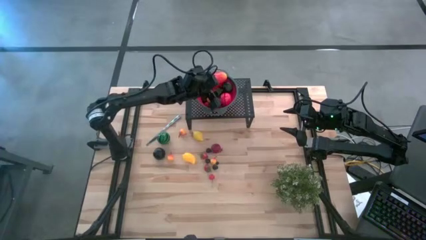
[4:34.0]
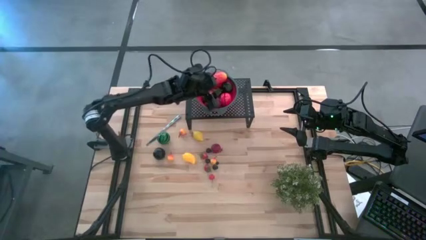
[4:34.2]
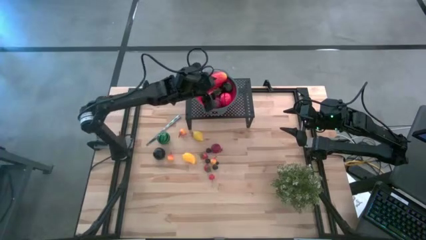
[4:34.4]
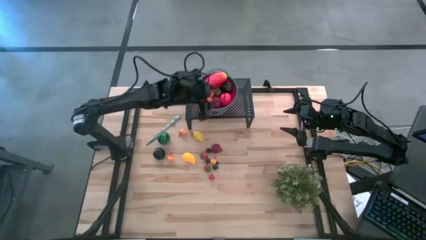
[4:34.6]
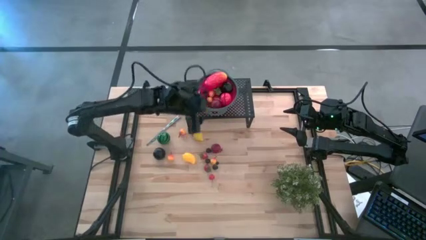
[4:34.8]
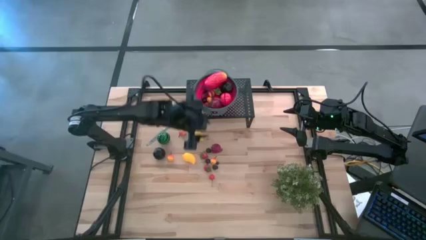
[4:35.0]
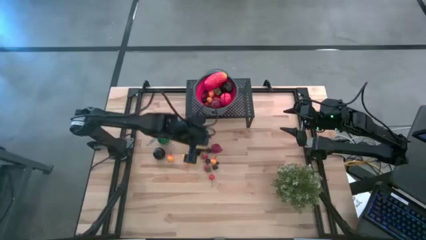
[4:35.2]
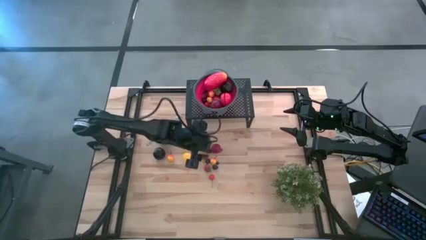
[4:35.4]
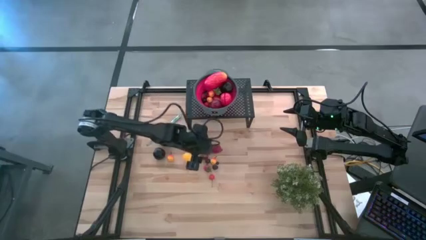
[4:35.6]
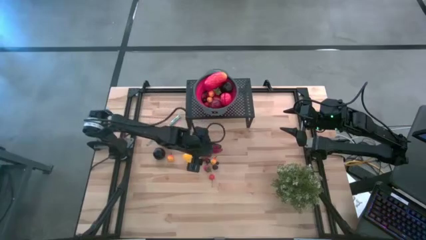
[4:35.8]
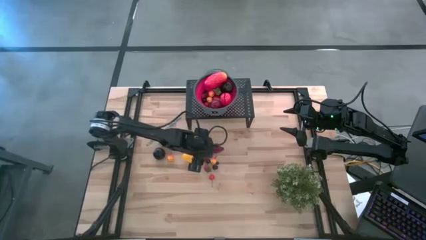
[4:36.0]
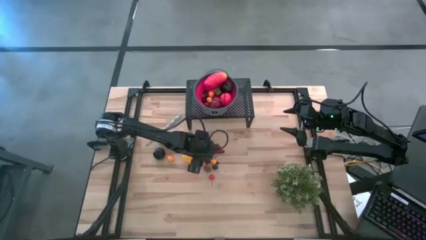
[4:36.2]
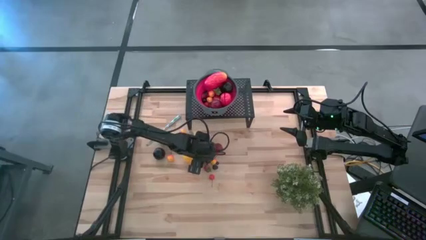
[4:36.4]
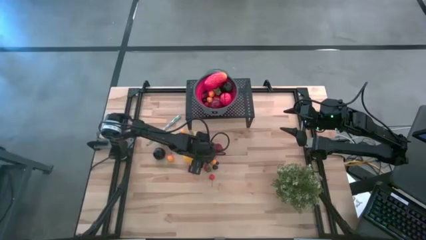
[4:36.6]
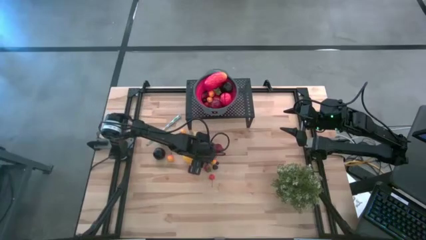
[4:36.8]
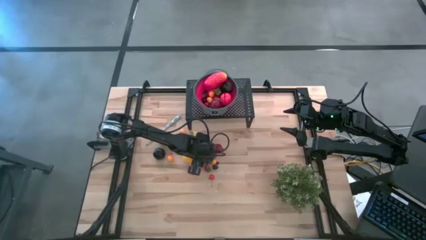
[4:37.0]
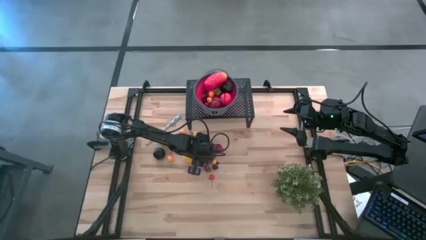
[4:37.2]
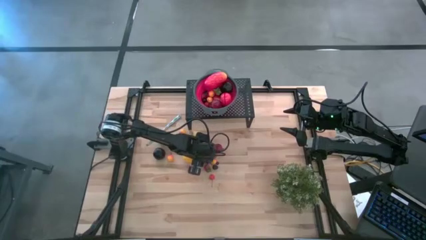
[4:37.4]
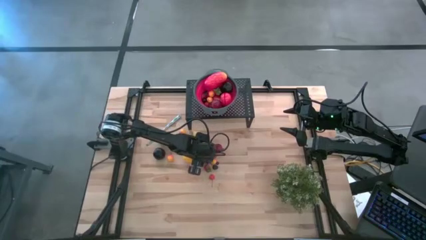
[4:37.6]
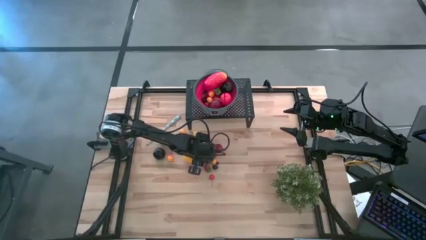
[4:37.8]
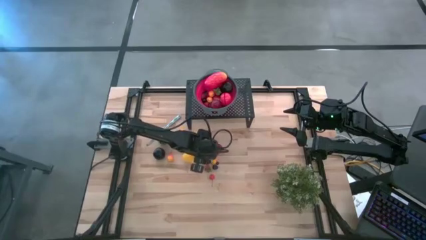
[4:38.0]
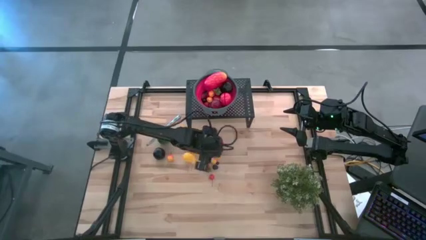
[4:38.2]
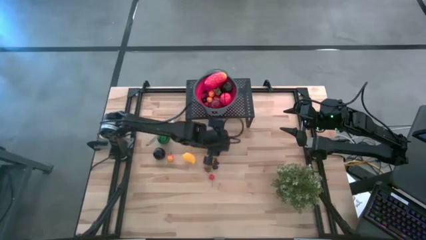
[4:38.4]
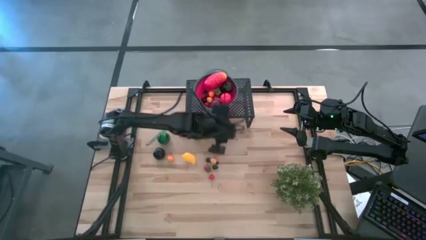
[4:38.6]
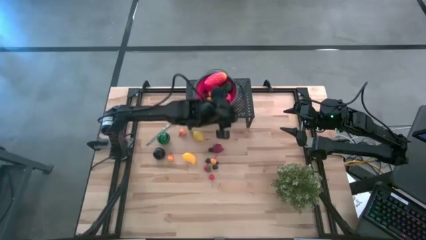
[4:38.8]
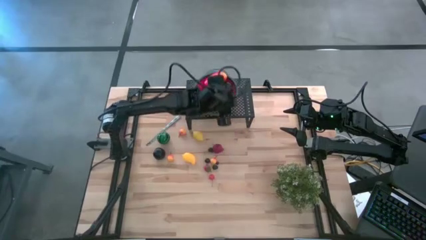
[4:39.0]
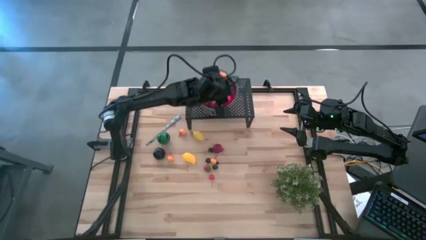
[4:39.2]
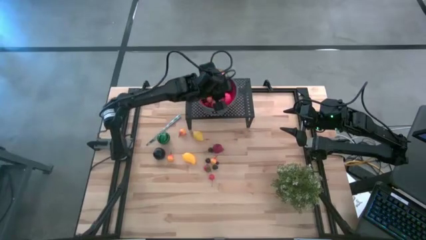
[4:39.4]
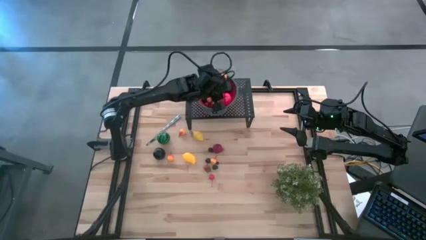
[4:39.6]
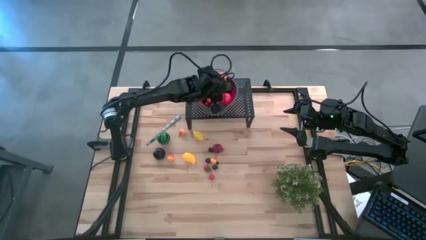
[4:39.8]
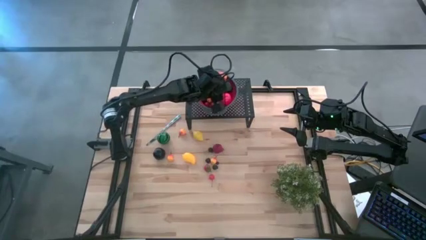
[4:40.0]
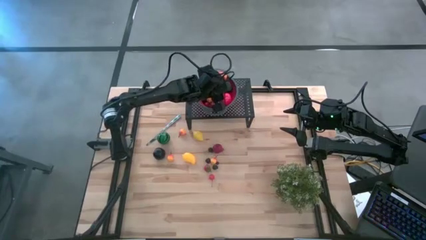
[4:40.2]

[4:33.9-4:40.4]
Task: Pick & Place Fruit
Put the strawberry in the red colander on the shelf

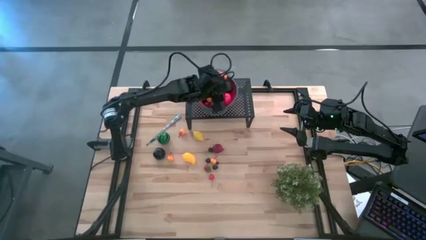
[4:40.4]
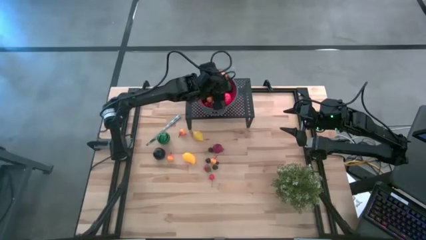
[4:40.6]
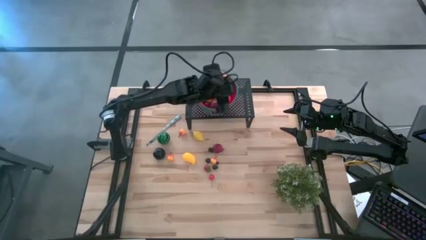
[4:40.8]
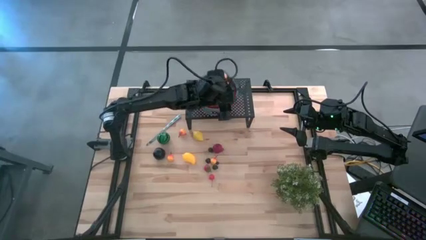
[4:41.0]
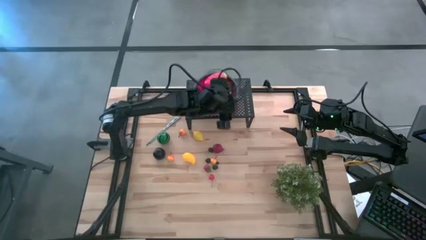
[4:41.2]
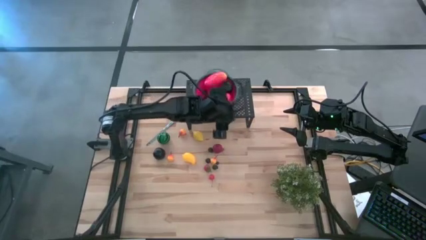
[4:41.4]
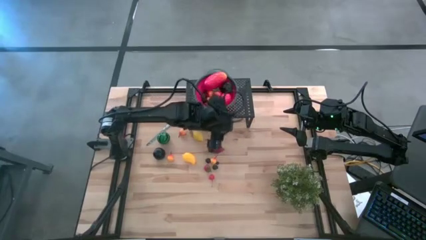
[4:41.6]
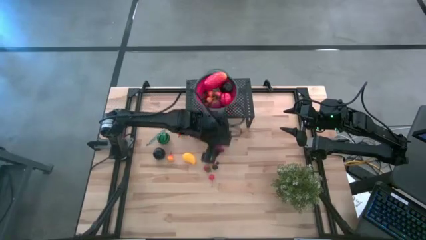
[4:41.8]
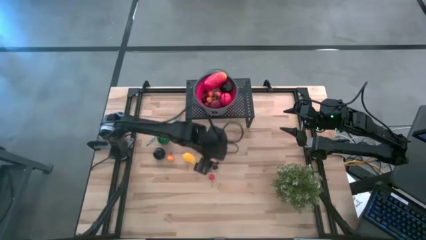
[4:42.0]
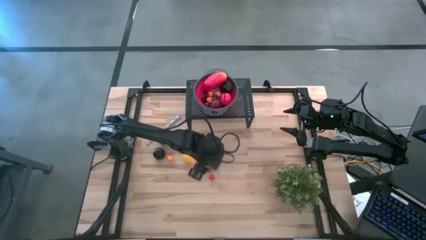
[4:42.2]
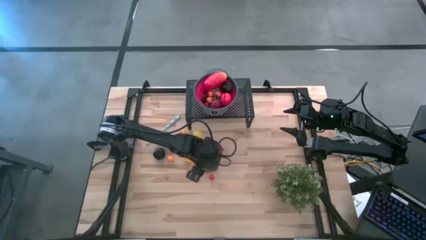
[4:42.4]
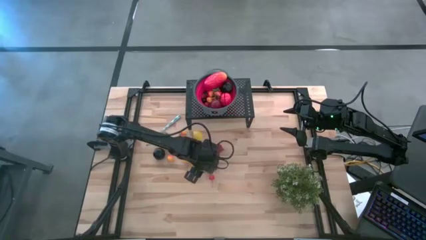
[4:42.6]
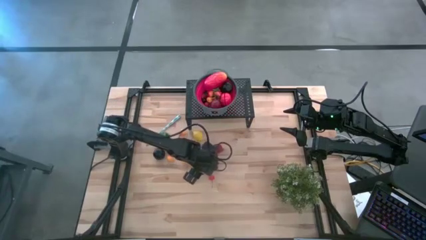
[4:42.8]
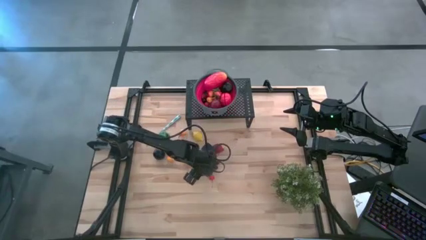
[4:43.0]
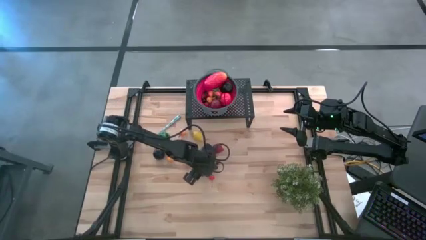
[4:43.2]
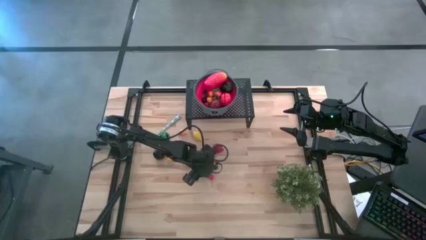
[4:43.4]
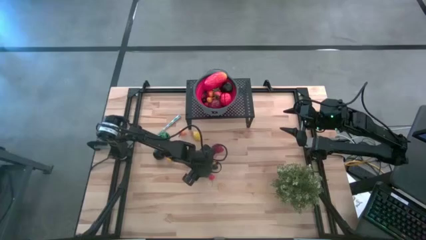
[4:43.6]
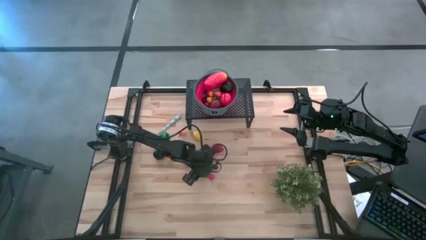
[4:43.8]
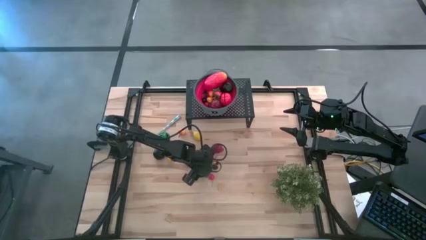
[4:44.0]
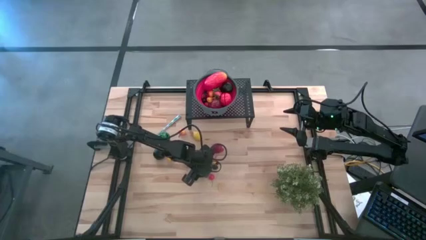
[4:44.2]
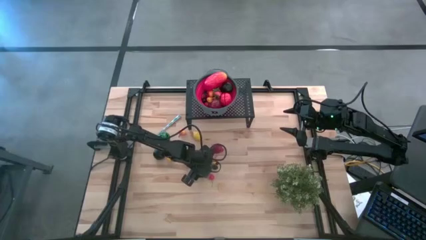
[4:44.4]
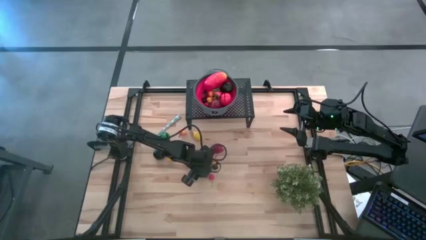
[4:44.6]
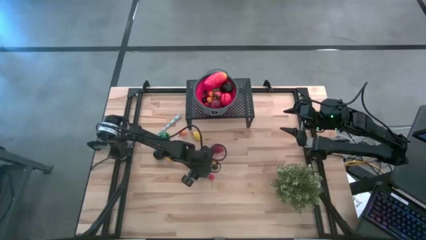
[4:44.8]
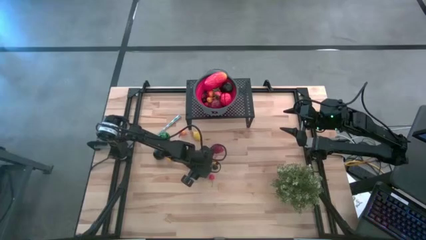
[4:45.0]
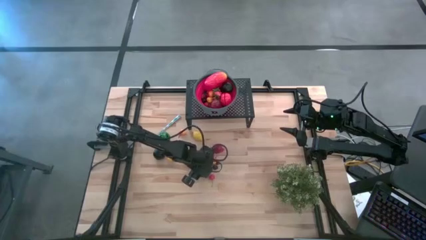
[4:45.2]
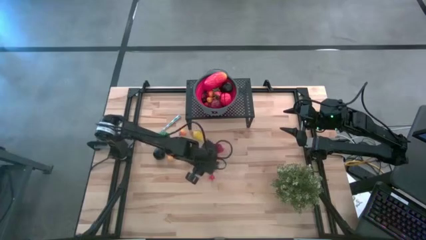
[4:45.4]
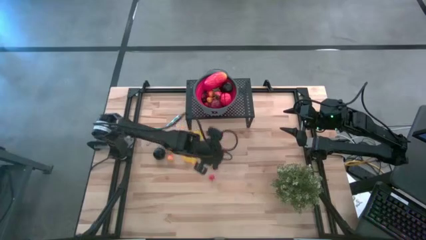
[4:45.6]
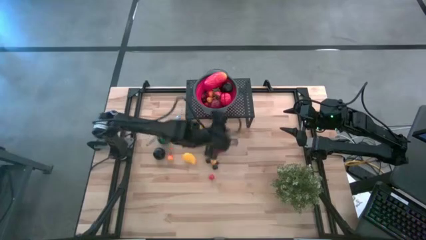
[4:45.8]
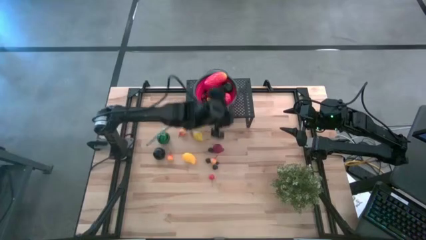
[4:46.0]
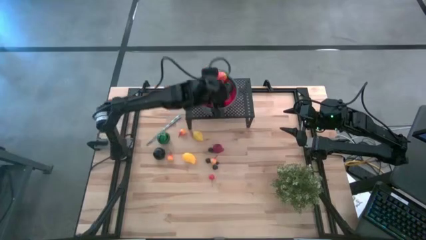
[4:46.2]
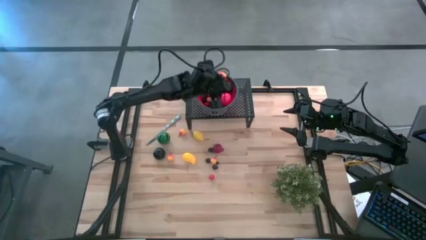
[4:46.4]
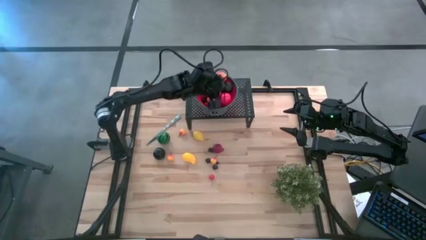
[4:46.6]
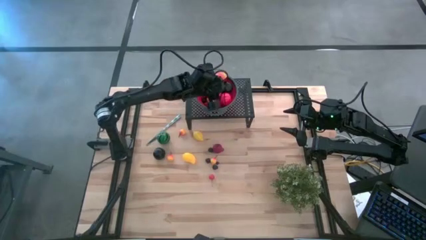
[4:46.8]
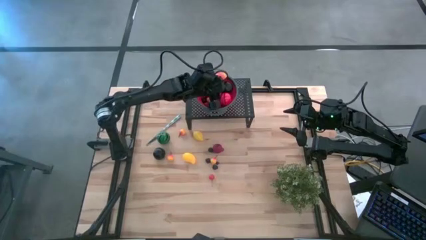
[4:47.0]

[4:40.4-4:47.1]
Put the strawberry in the red colander on the shelf

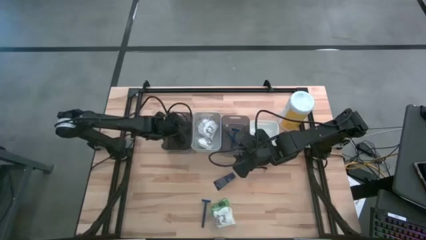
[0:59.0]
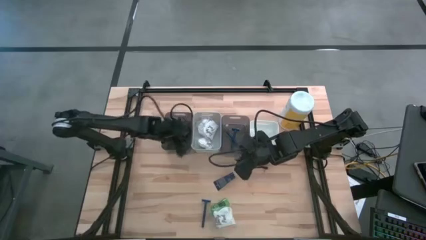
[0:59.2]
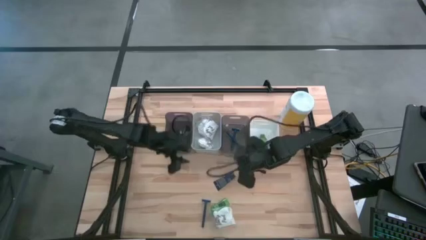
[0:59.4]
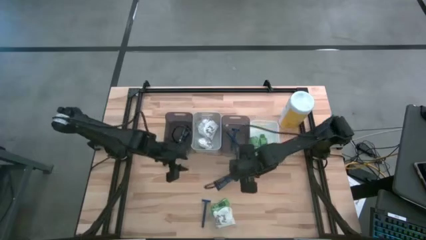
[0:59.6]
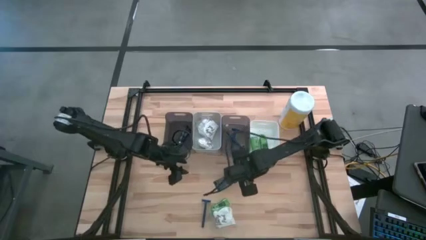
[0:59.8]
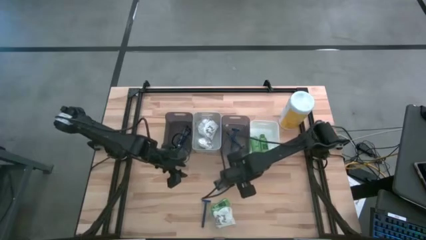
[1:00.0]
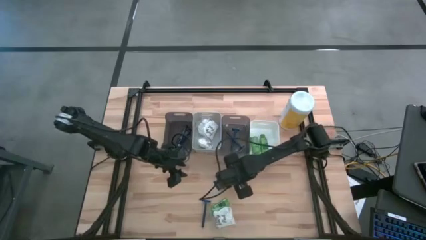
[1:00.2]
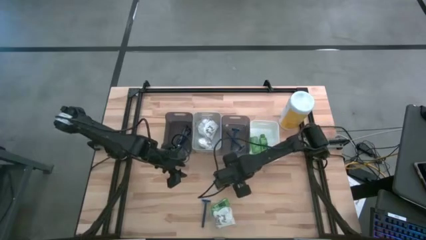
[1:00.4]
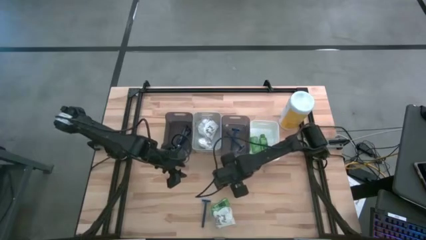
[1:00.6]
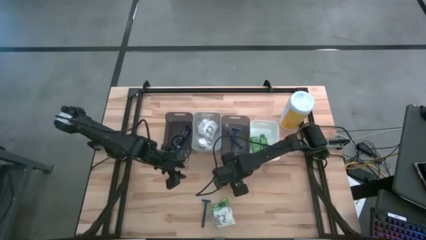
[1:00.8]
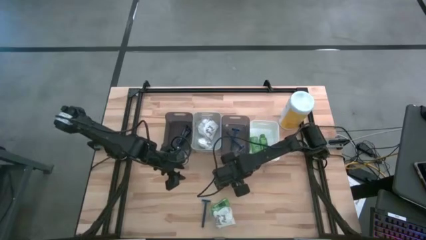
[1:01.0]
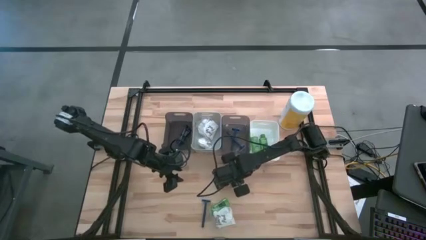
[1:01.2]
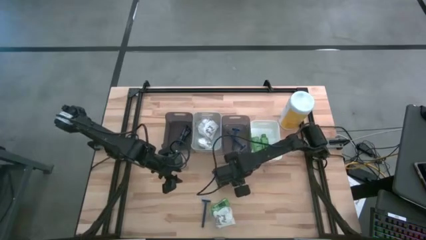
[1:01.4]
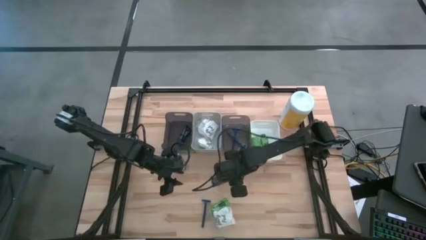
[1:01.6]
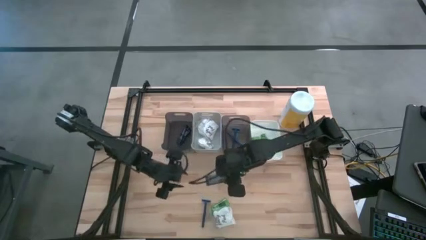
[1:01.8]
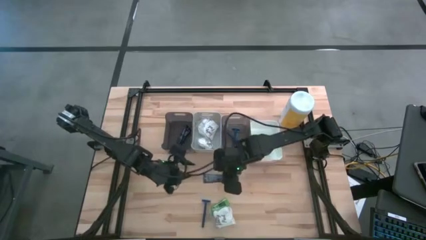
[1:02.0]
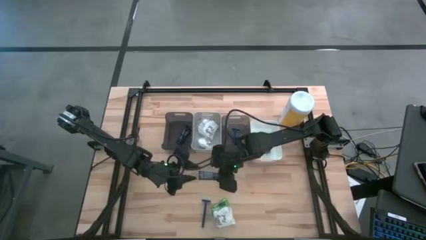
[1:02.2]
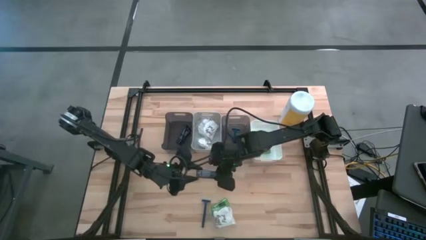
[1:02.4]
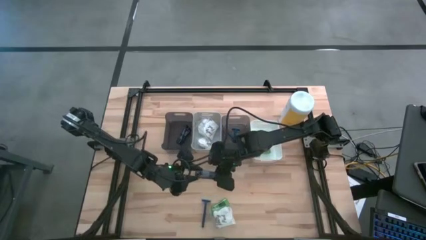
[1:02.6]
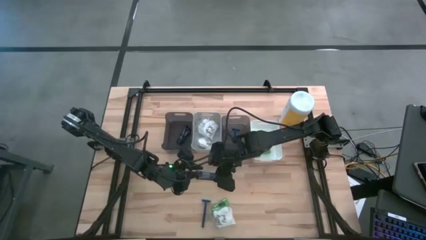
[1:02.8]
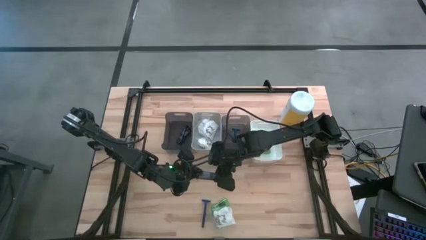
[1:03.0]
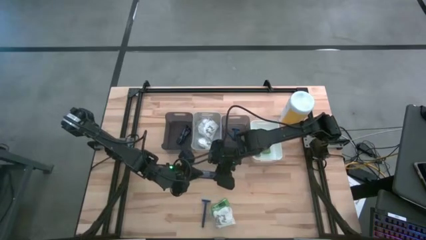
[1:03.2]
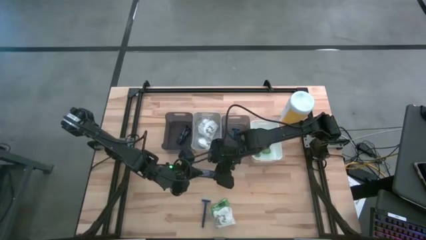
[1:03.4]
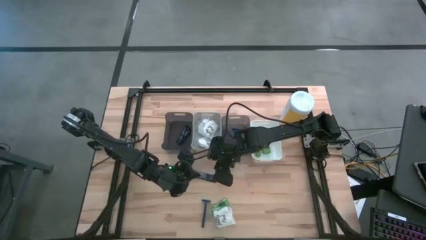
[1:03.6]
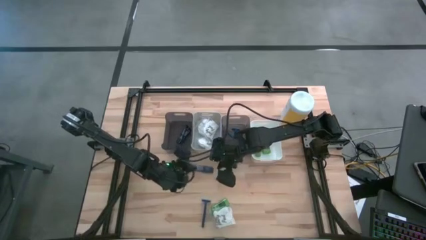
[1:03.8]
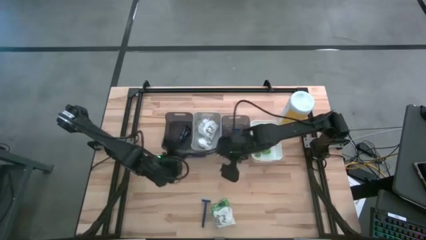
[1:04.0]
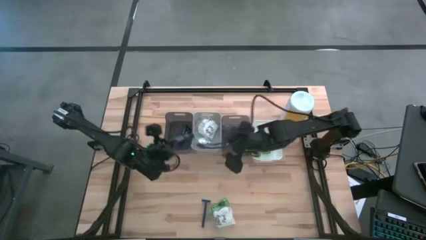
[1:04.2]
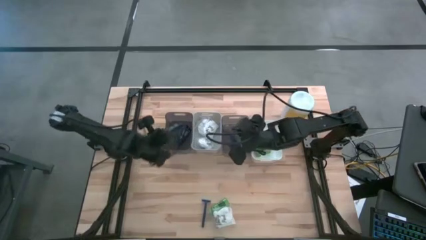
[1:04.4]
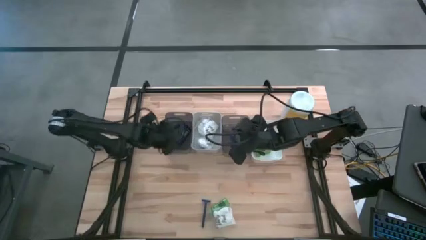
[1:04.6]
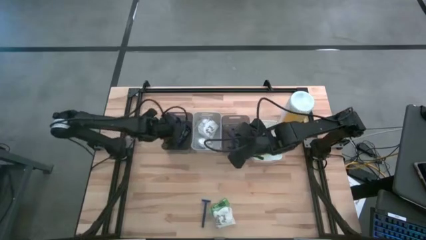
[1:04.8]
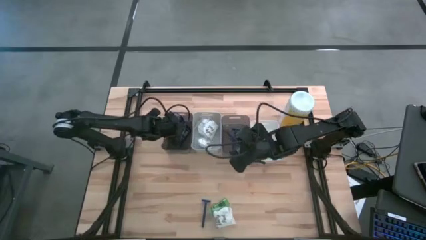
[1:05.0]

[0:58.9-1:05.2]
Task: Pick & Place Travel size toiletries
Put the blue shave cream into the left black bin
